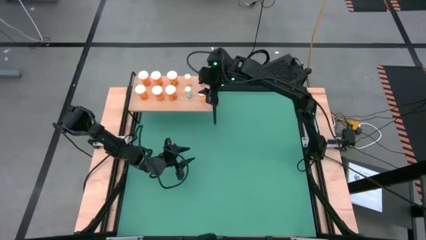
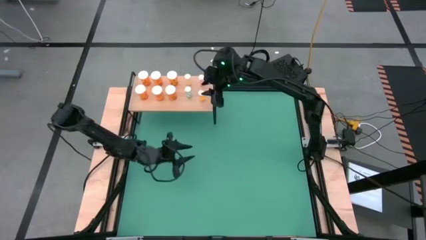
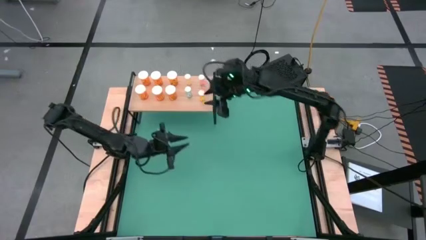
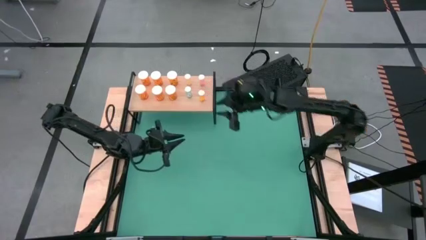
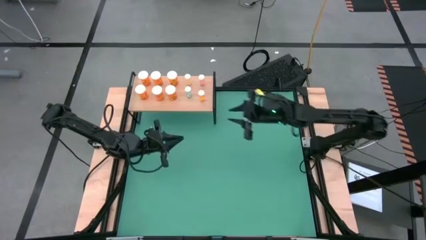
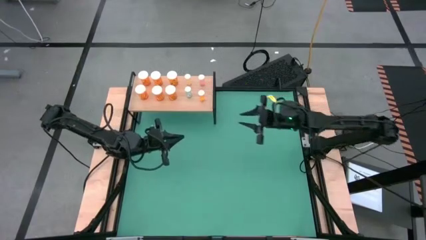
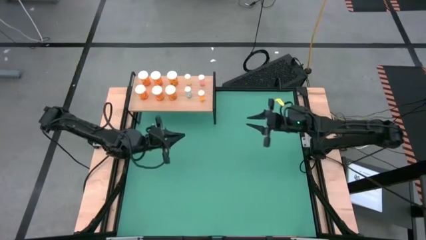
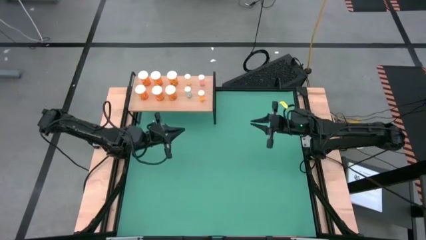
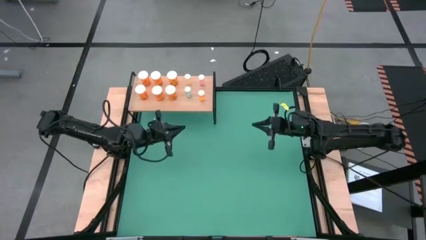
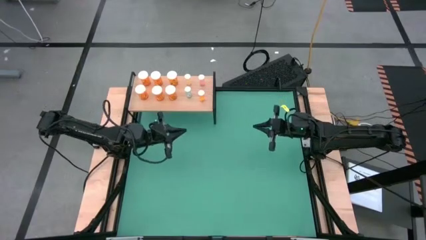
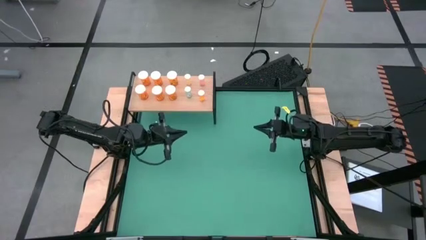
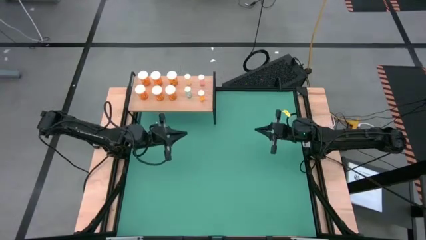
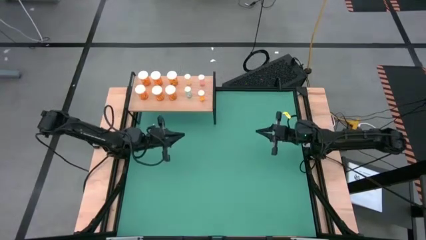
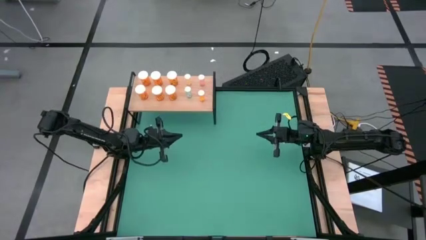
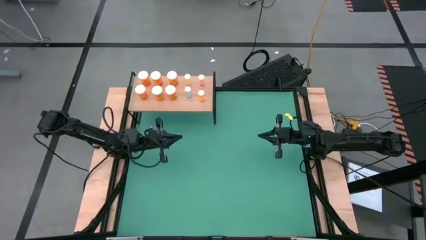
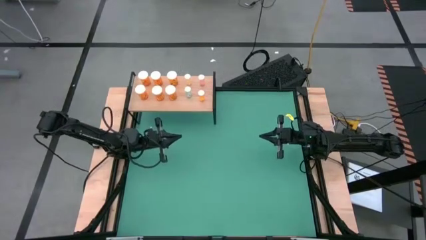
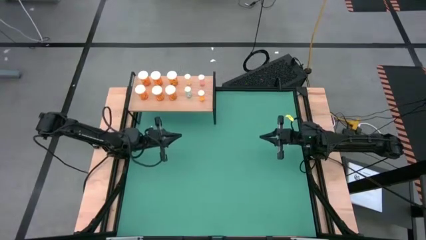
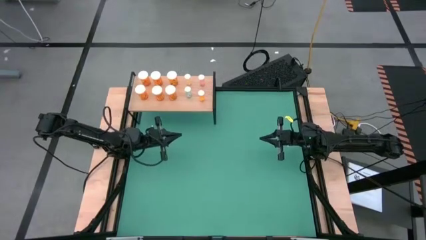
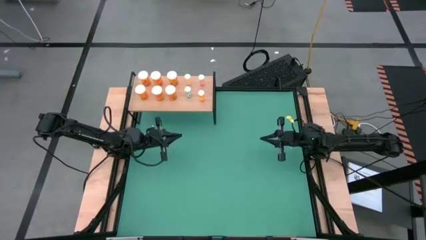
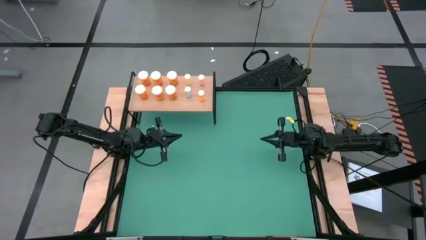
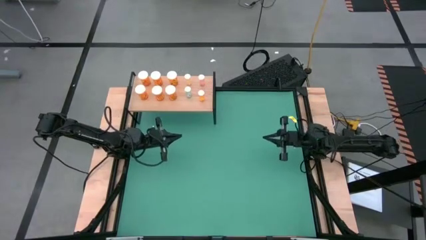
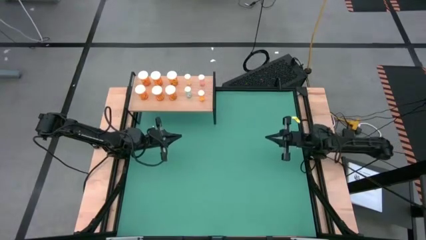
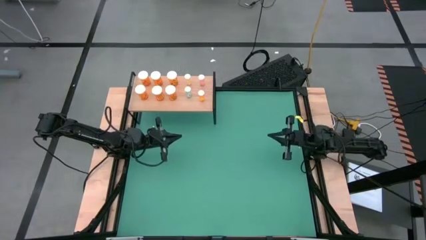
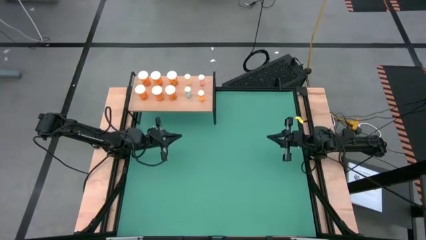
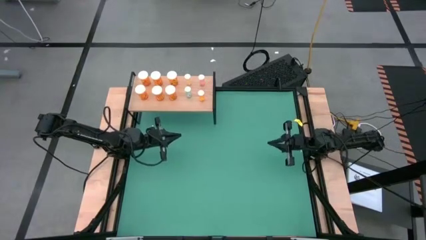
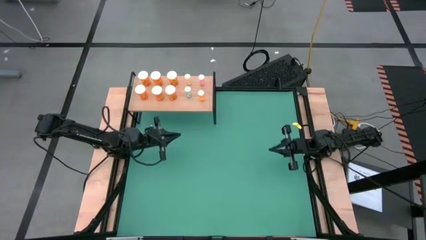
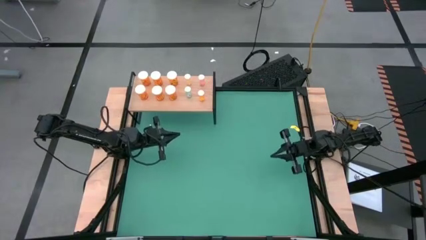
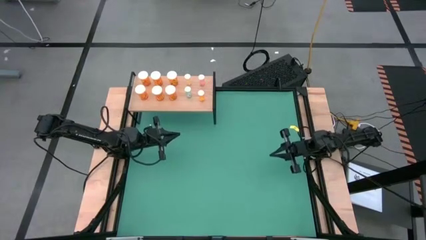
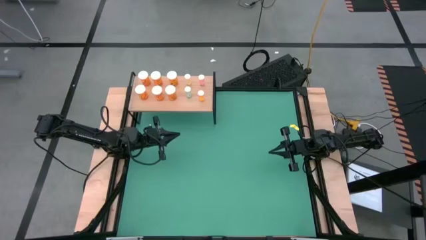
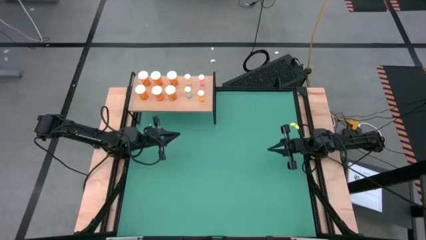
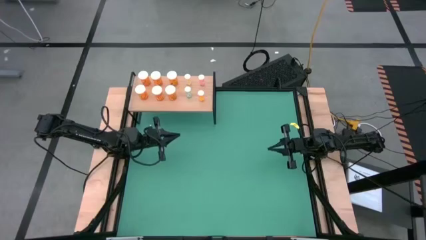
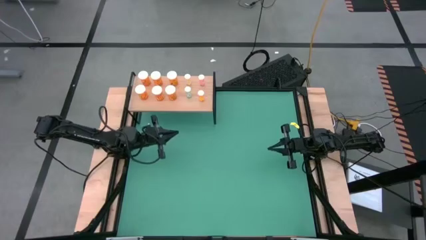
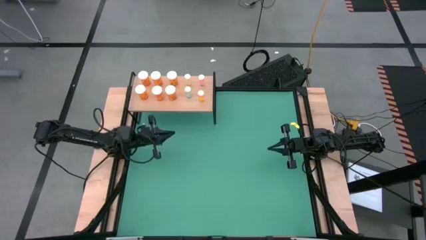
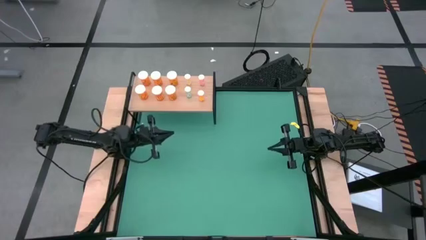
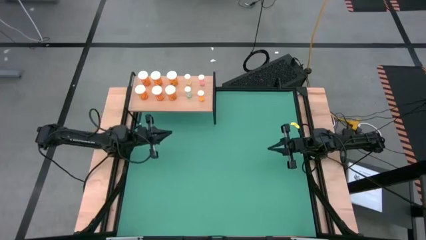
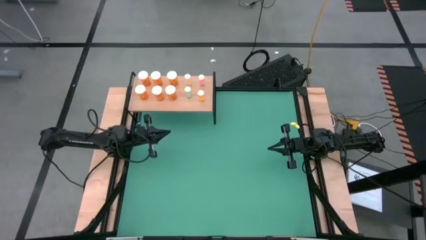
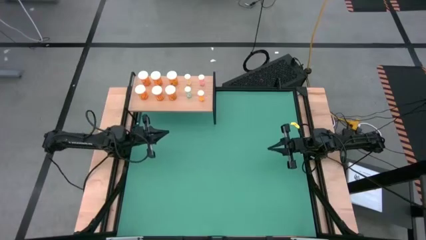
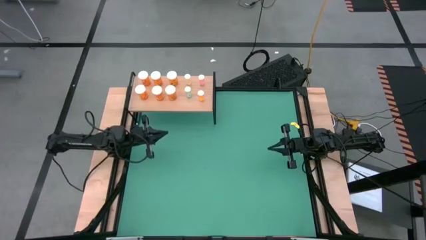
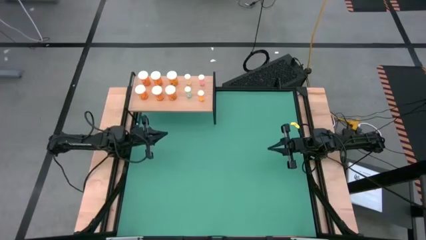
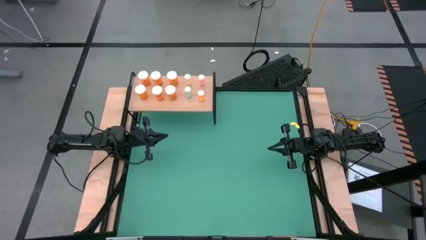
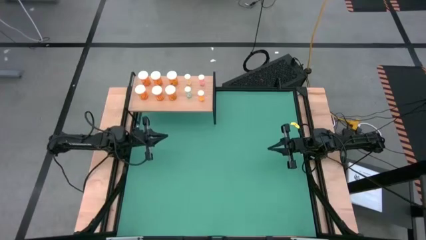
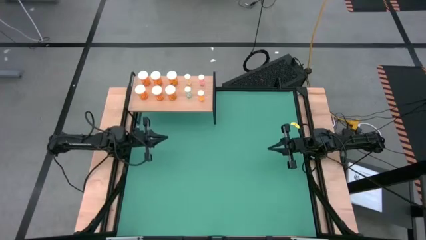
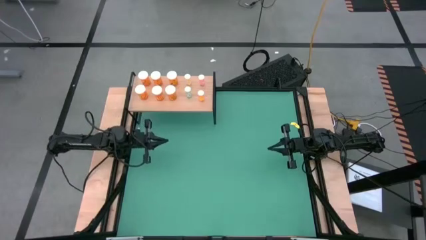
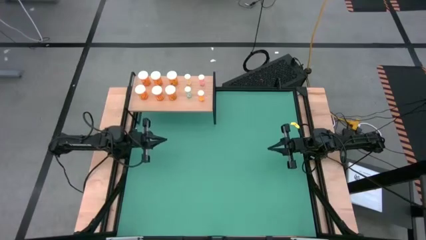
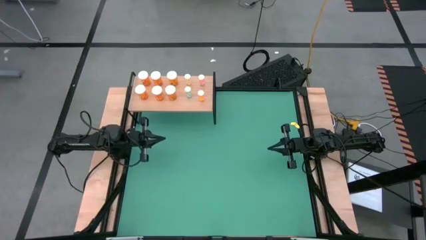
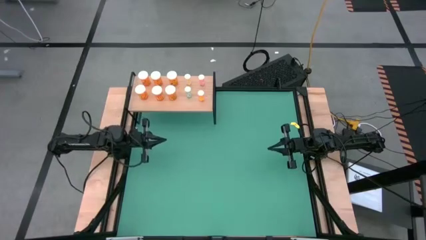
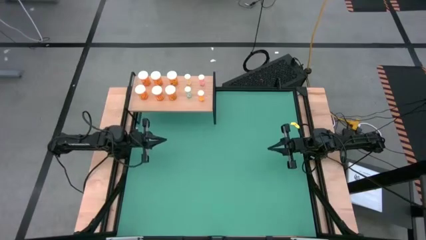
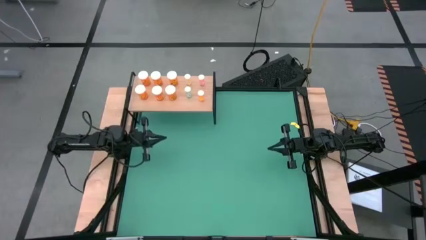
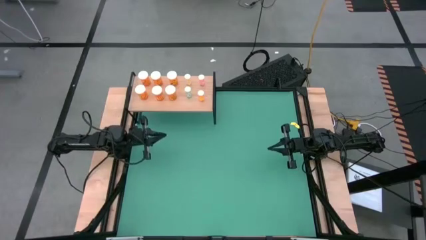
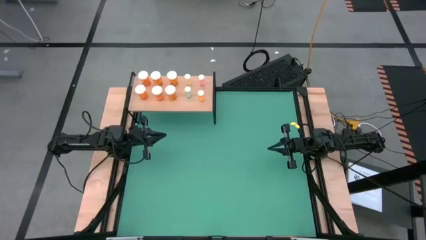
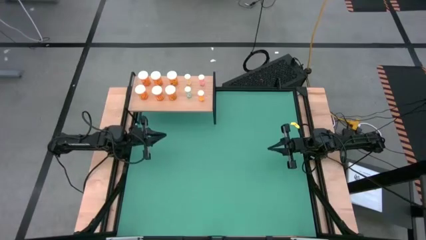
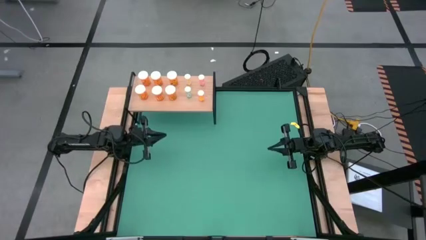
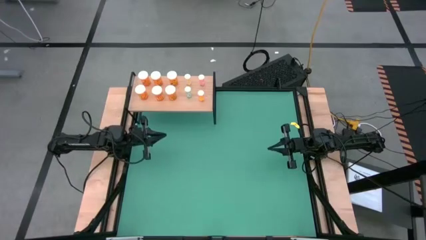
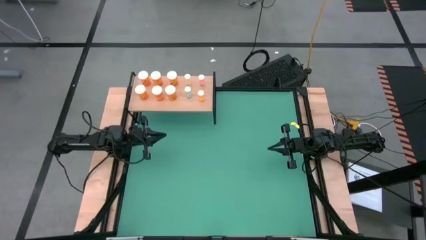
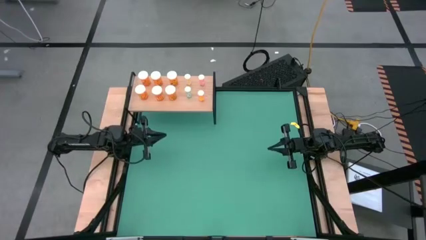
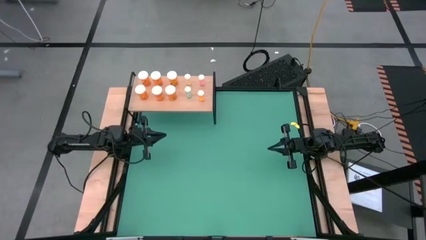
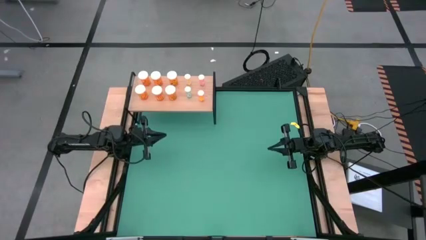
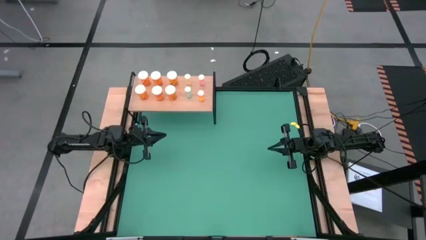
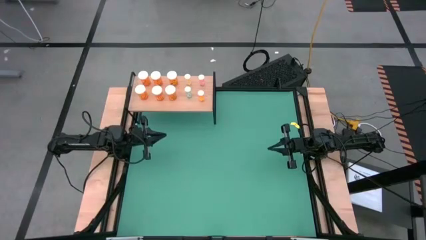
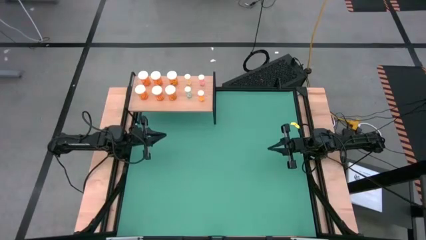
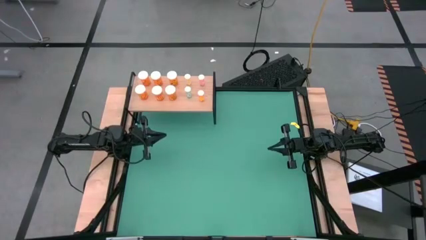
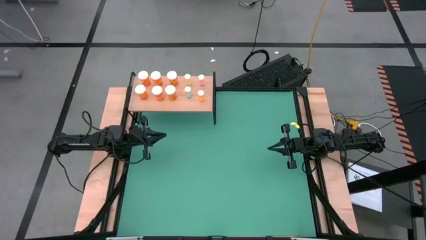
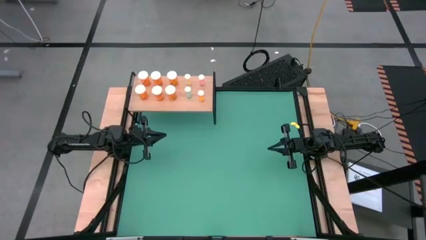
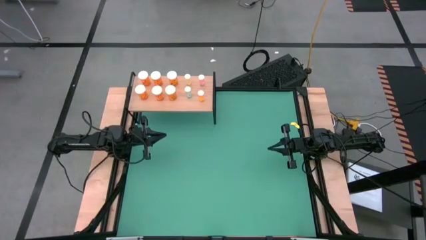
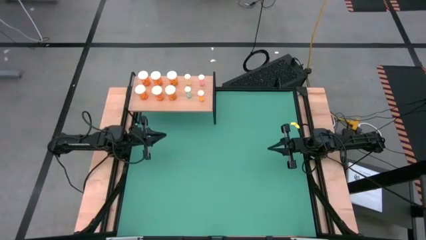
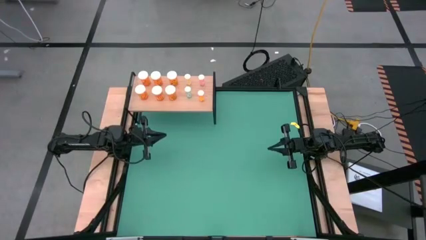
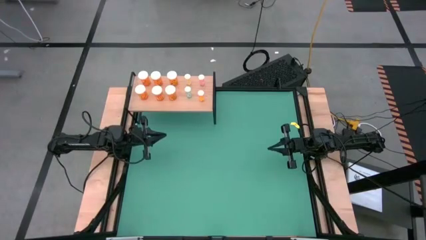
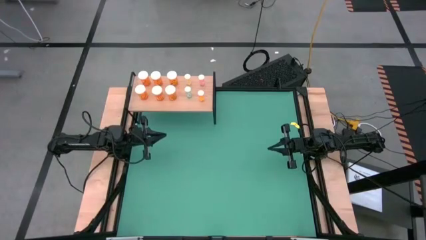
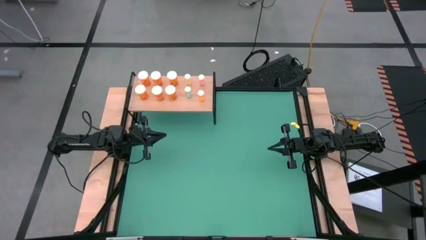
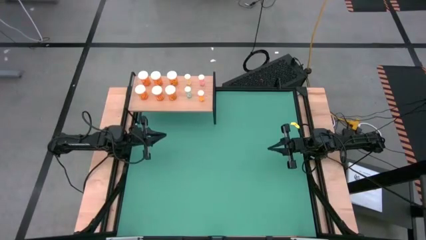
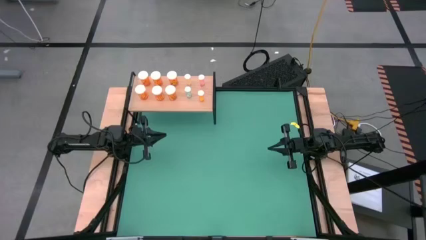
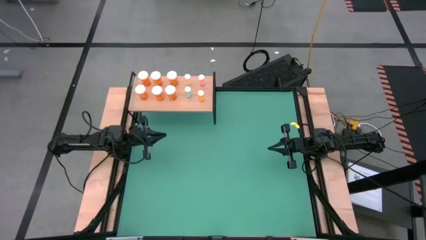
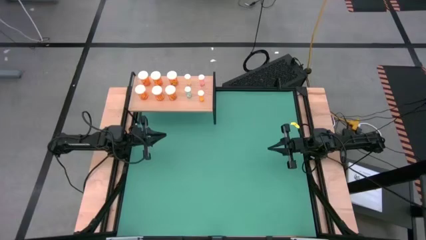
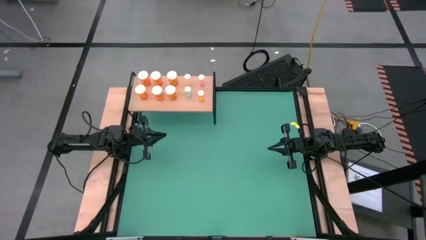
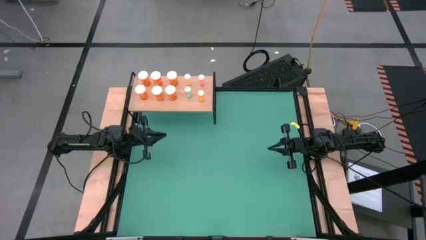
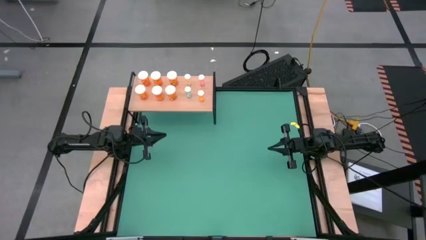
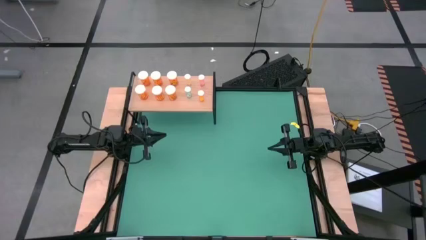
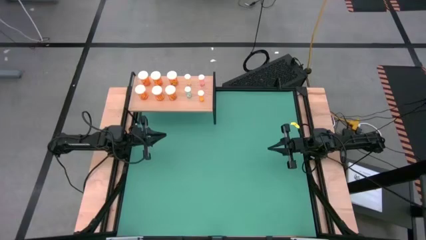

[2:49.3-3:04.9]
Task: Pick and place medicine bottles onto shelf by color
Return to Home Position
